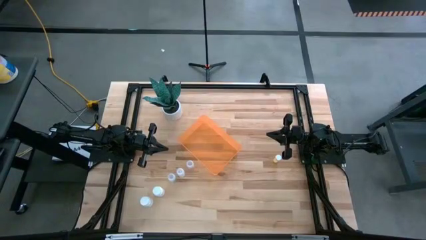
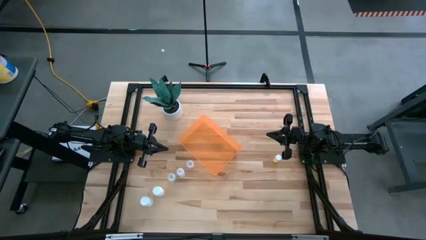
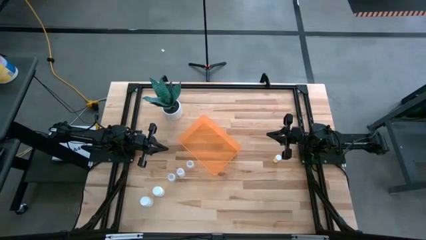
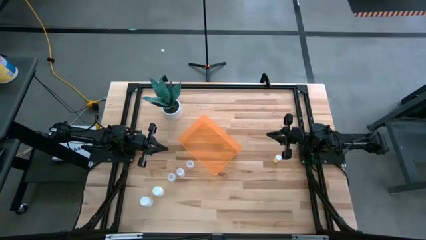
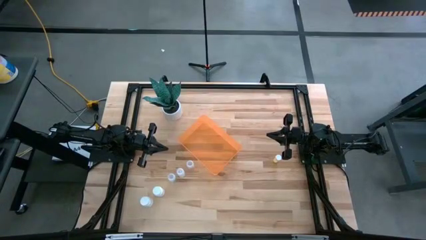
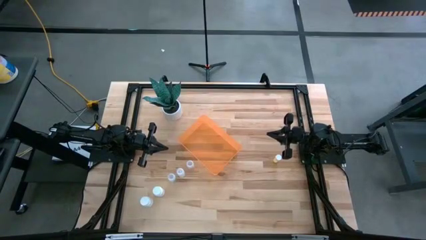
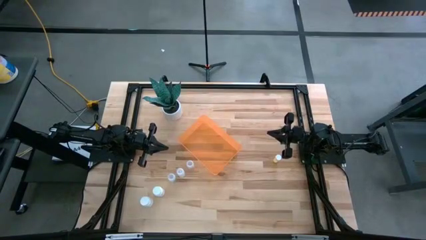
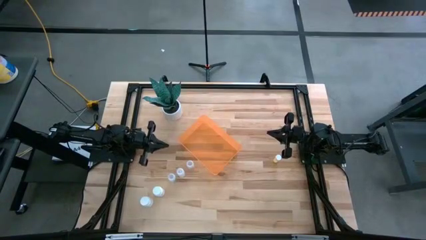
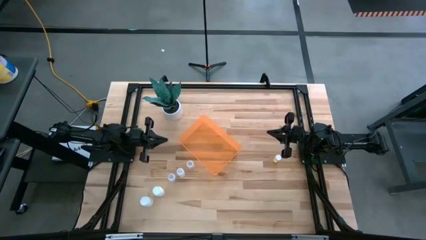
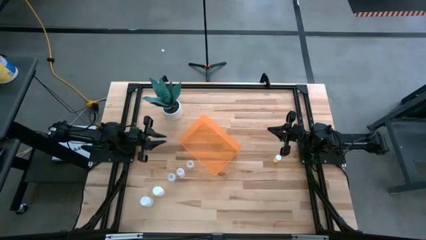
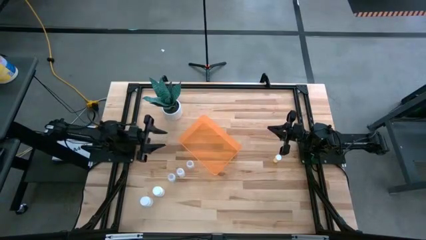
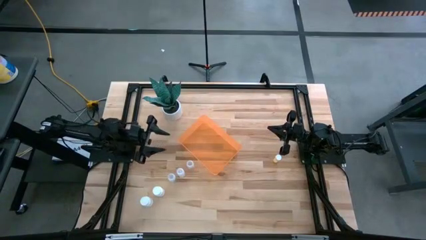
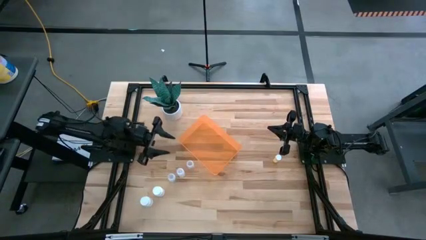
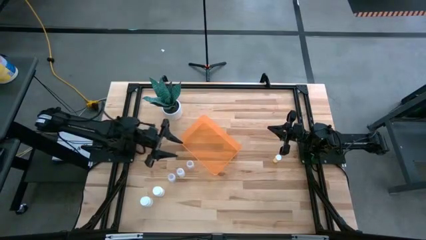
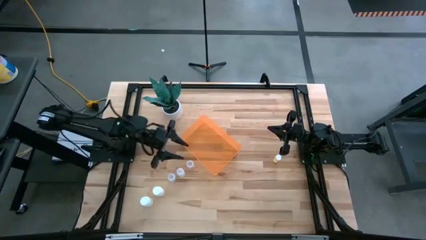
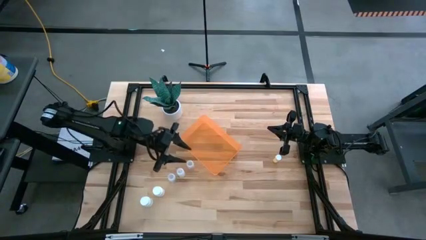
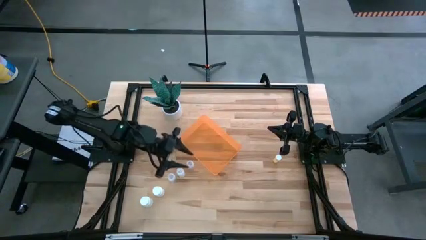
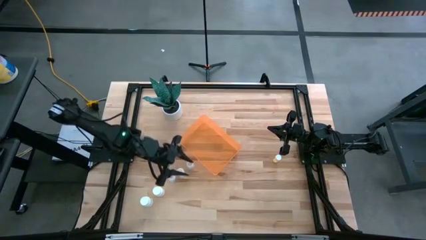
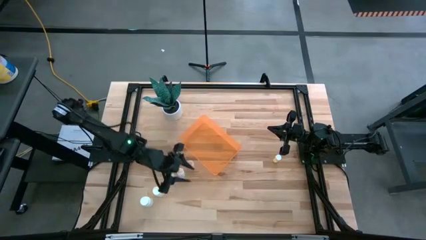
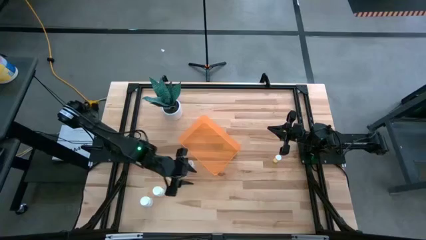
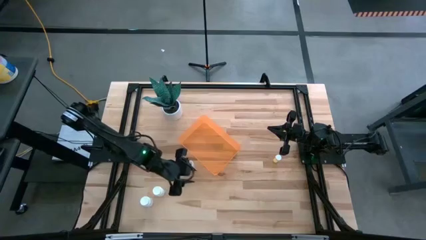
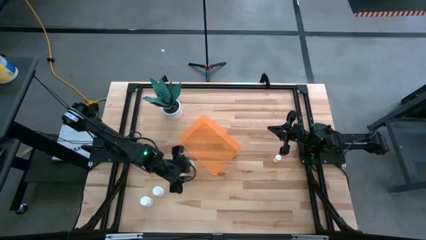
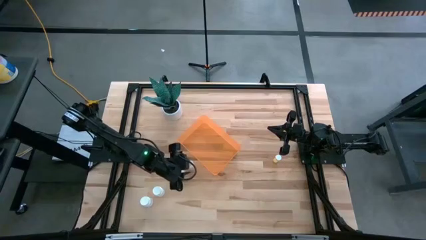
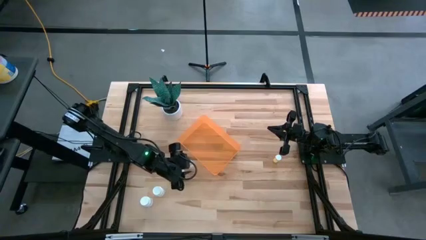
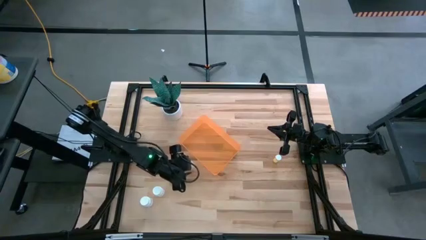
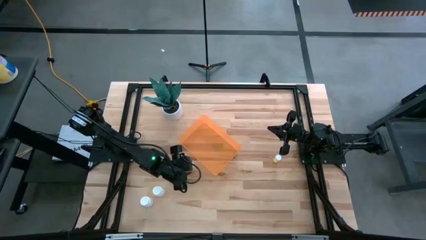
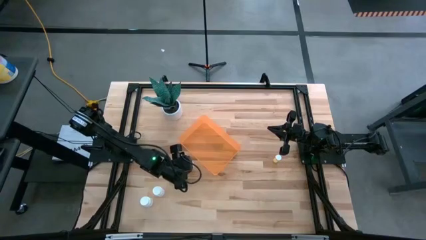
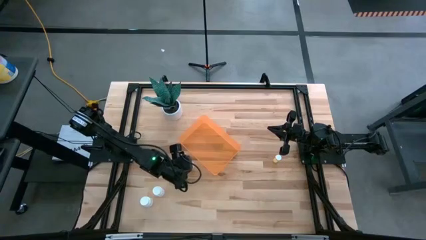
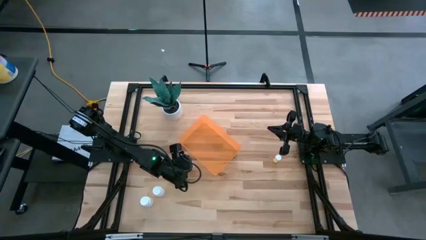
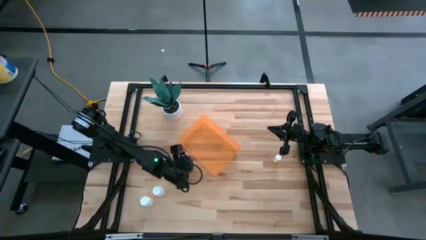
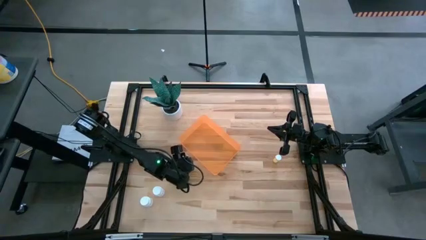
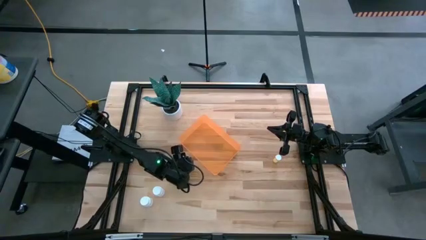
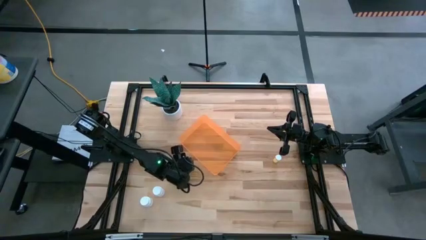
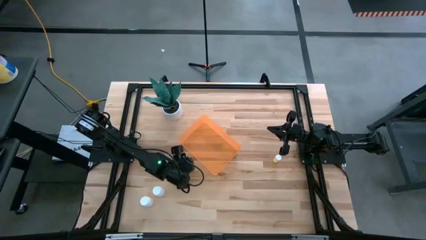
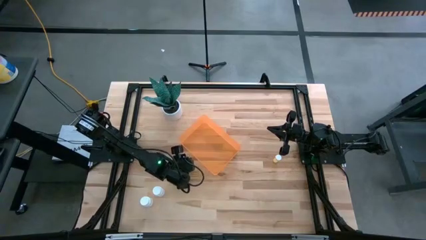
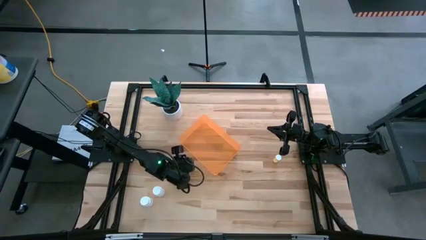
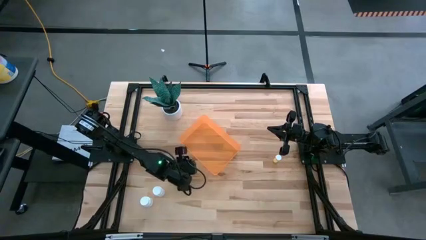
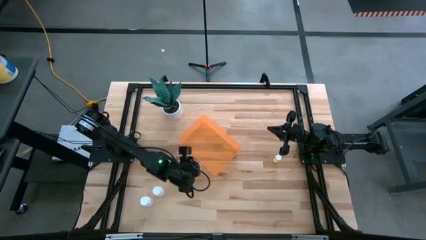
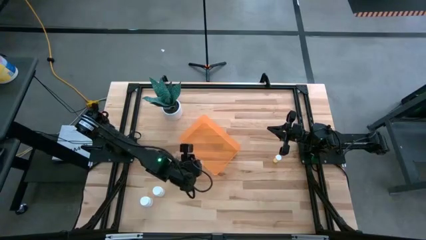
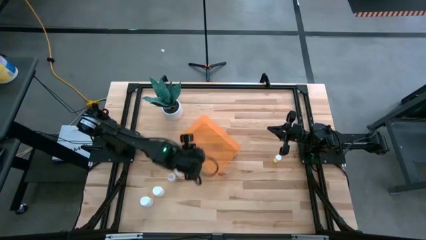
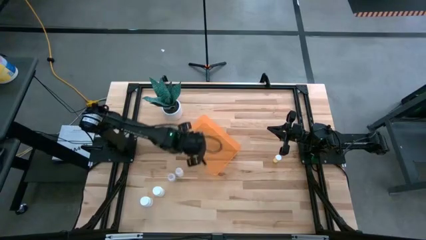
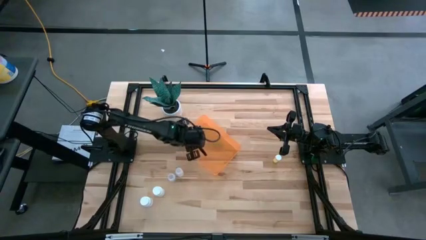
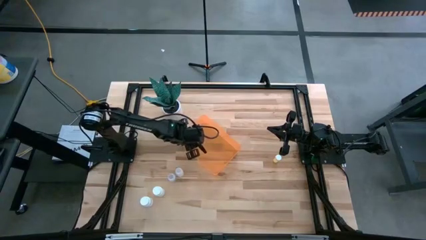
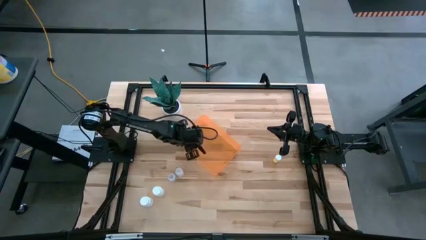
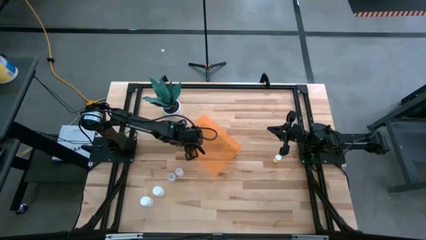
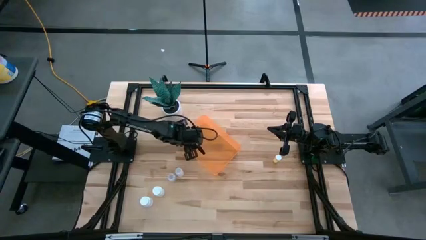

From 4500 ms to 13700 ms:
Task: Pick and place pill bottles into a basket
Put the top transparent bottle into the orange container

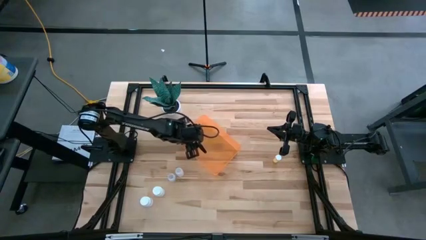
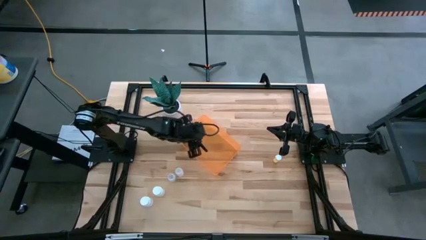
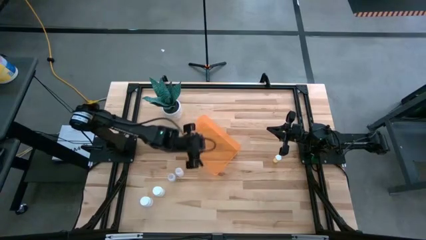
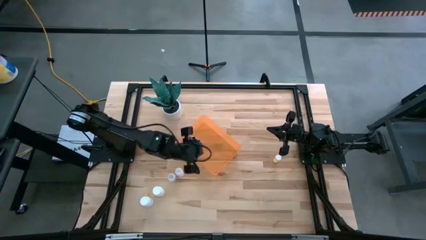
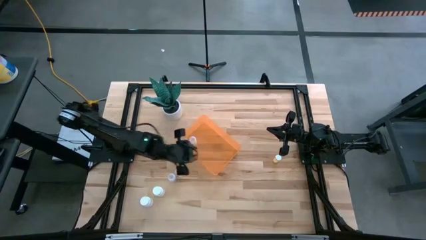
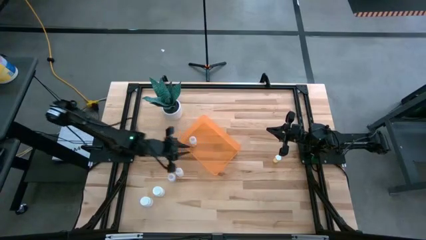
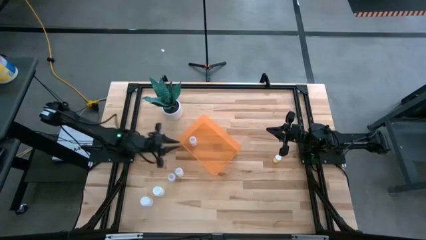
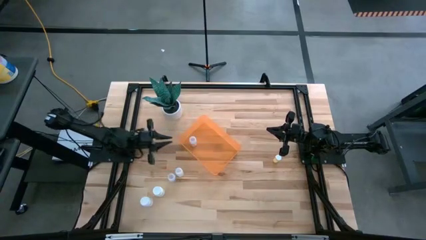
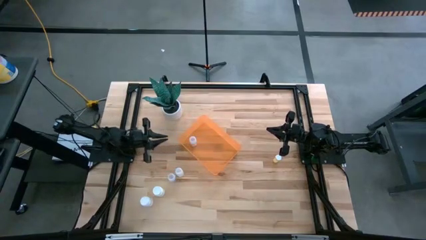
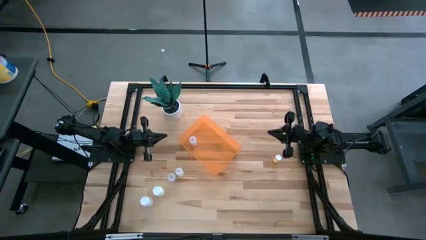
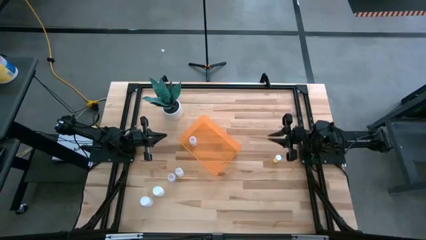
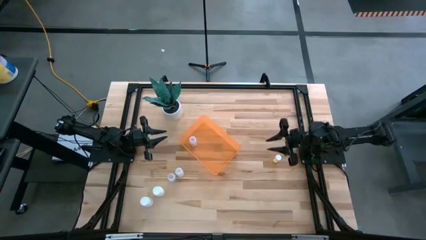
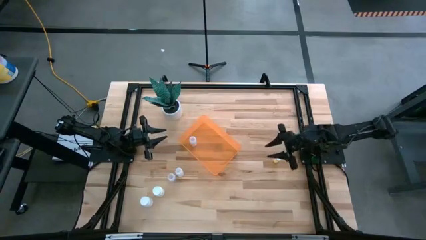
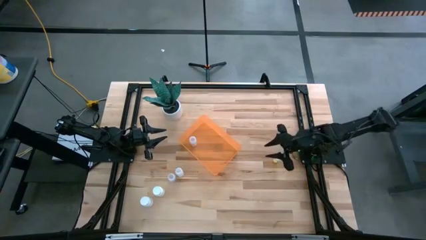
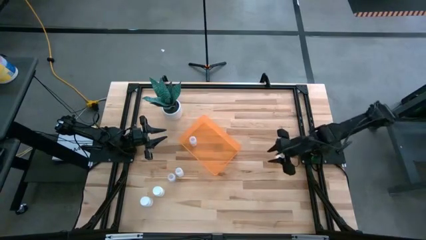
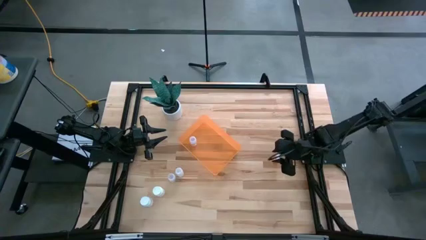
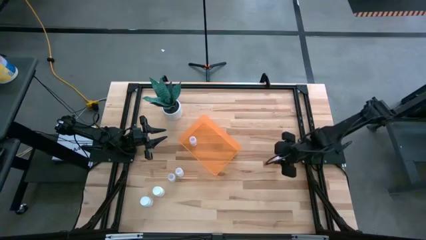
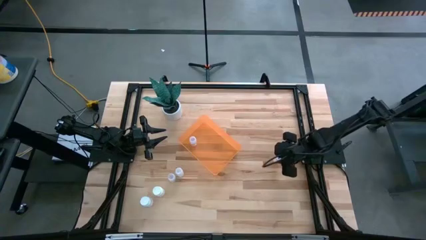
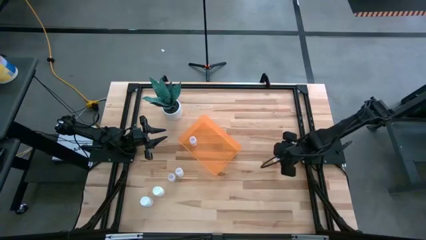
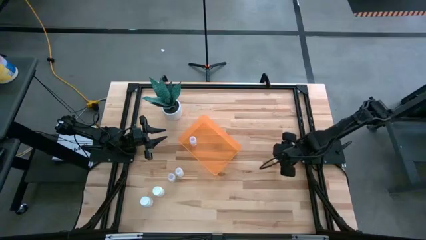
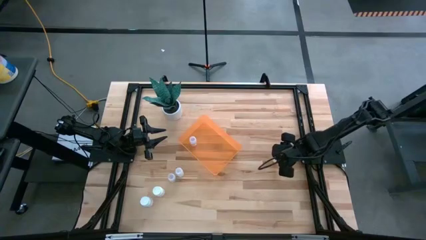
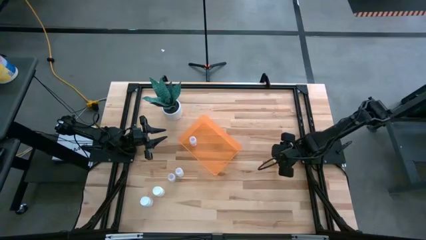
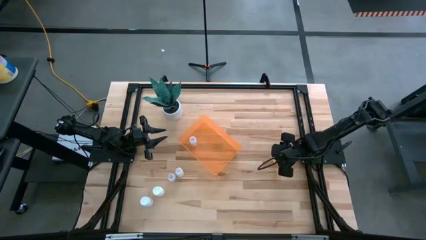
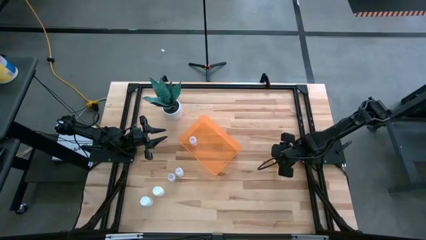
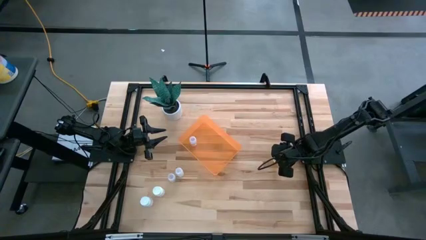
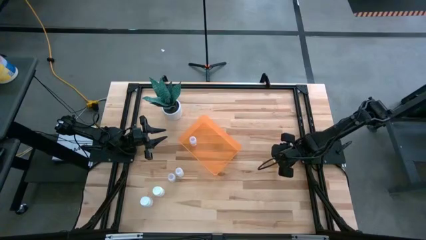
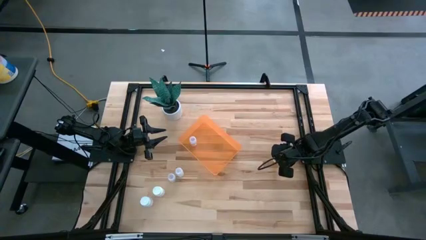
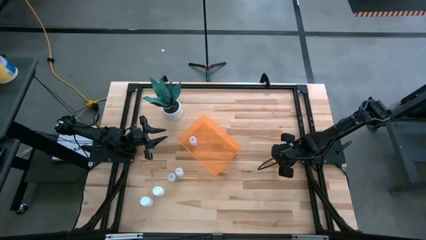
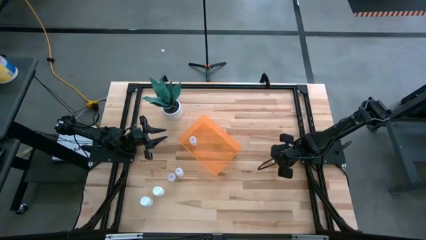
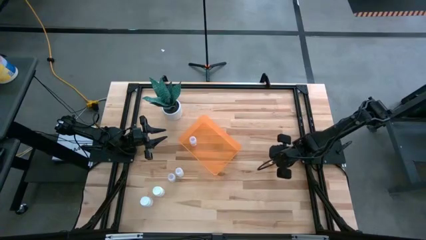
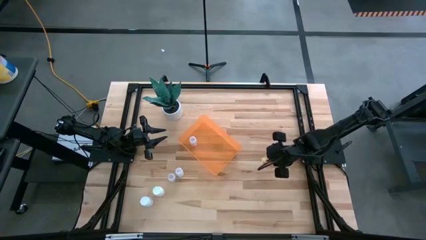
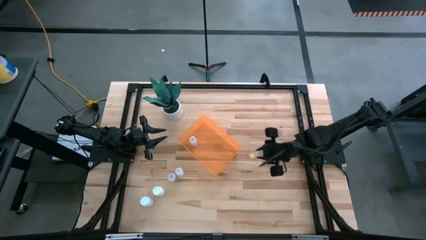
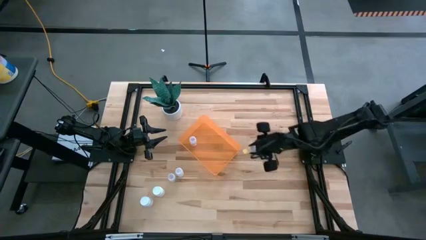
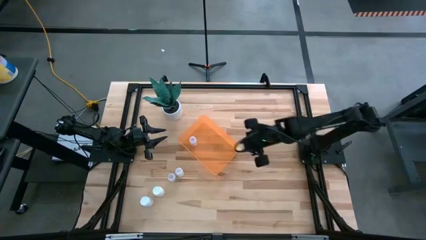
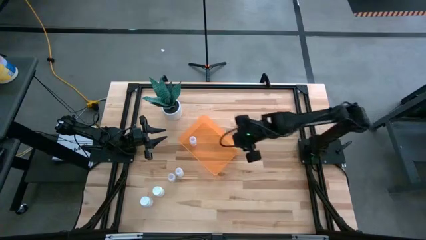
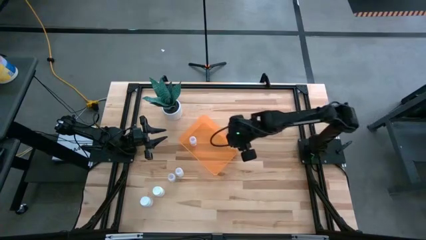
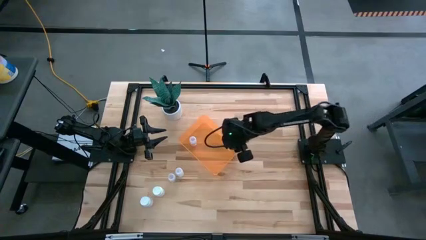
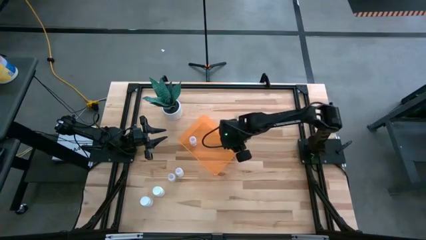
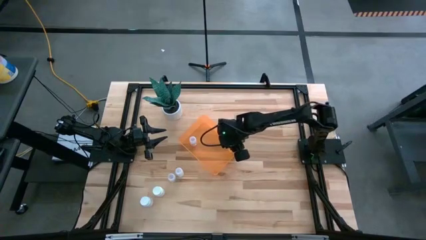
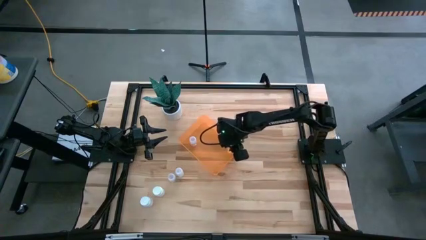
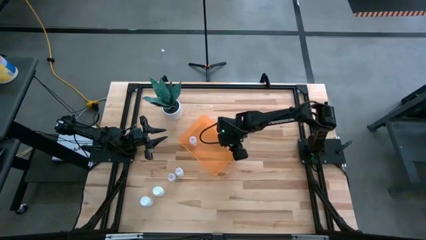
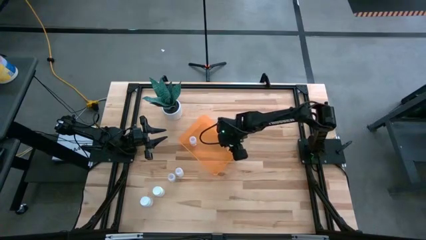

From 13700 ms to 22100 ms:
Put the yellow bottle into the orange container
